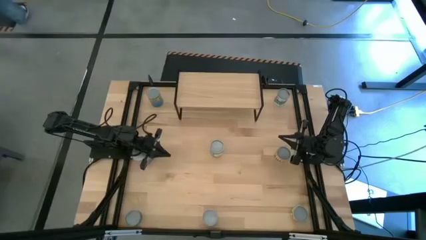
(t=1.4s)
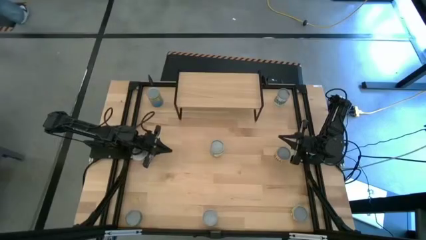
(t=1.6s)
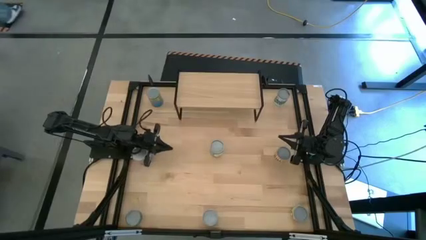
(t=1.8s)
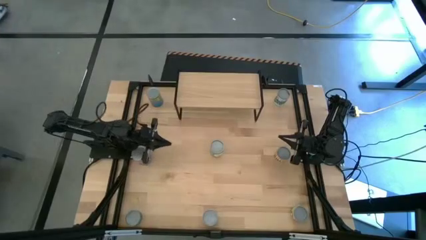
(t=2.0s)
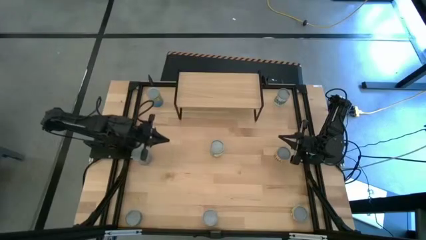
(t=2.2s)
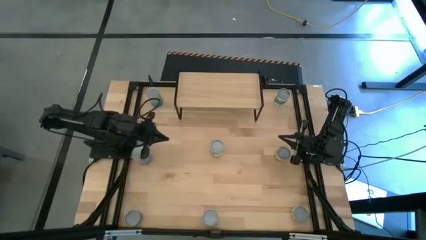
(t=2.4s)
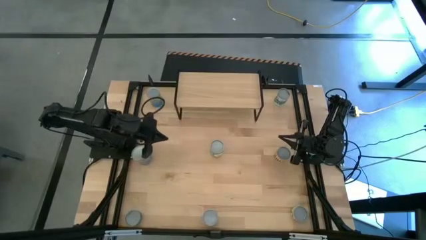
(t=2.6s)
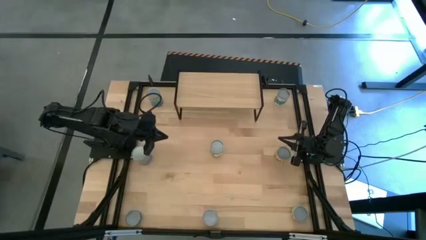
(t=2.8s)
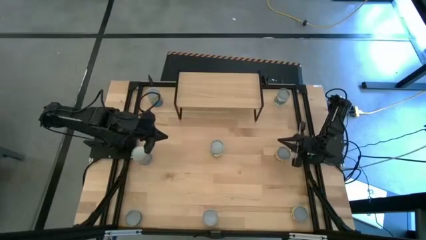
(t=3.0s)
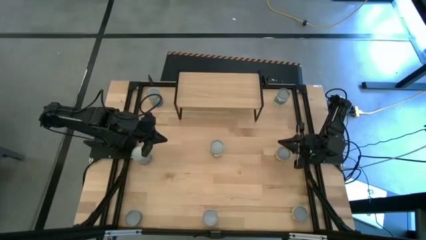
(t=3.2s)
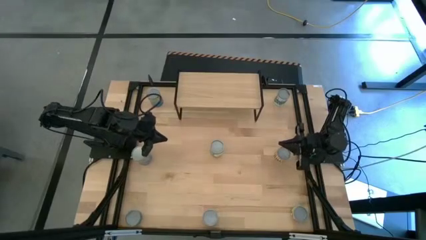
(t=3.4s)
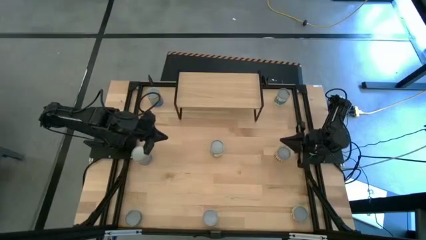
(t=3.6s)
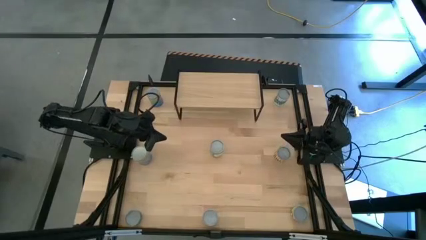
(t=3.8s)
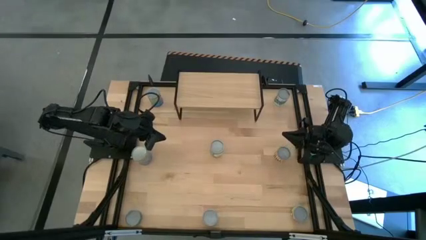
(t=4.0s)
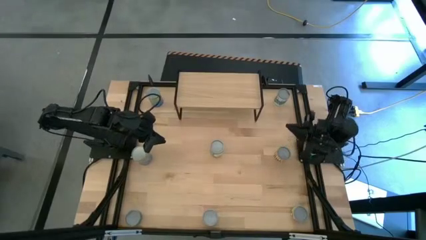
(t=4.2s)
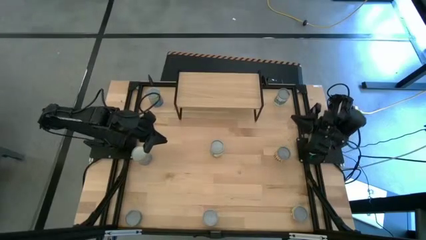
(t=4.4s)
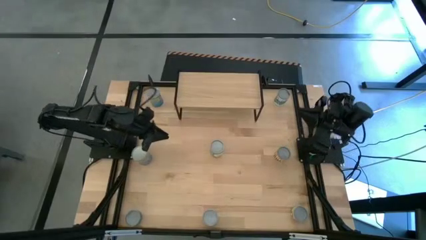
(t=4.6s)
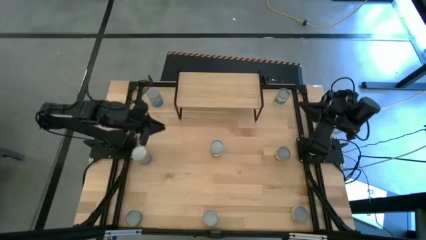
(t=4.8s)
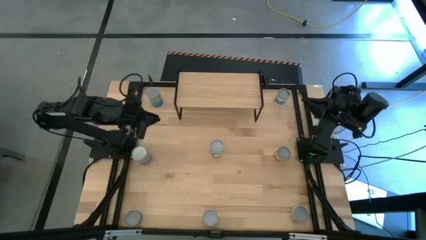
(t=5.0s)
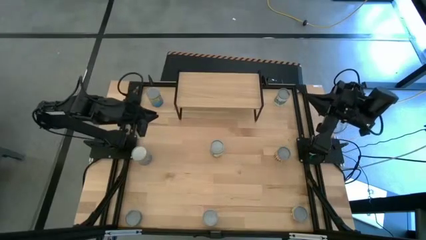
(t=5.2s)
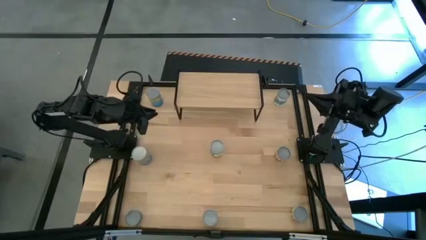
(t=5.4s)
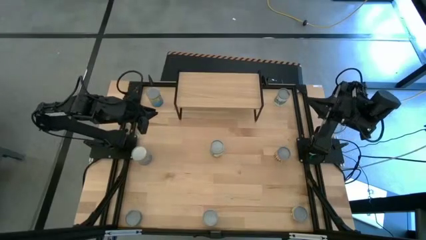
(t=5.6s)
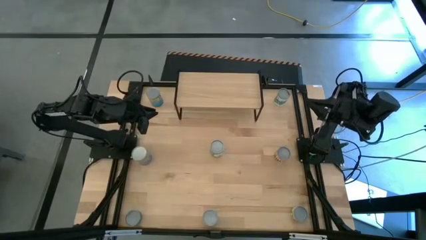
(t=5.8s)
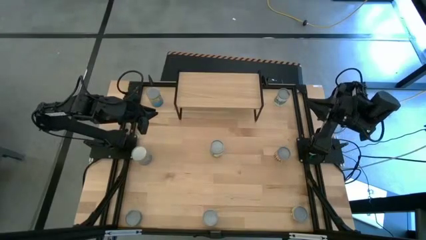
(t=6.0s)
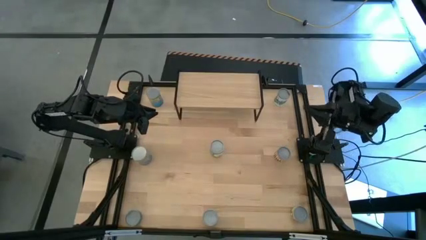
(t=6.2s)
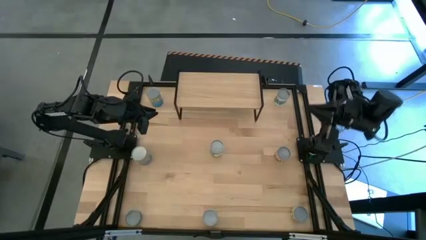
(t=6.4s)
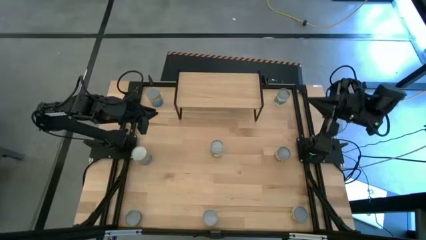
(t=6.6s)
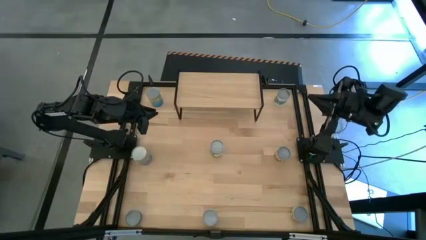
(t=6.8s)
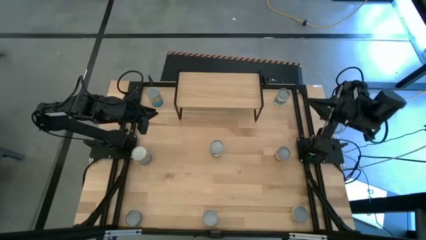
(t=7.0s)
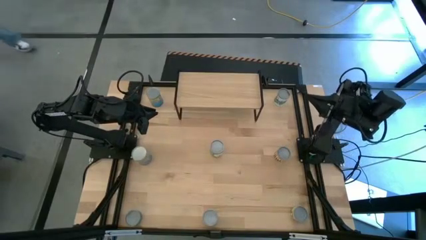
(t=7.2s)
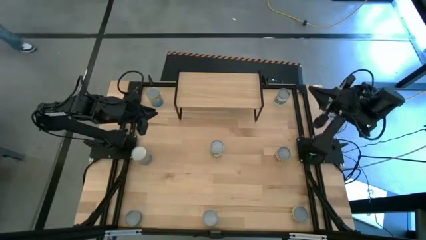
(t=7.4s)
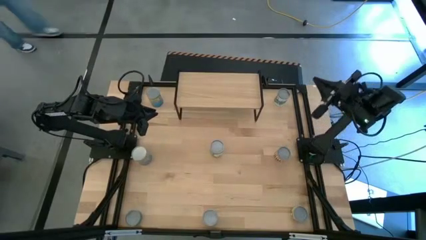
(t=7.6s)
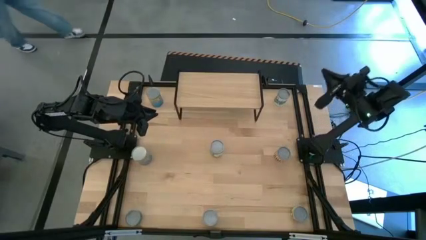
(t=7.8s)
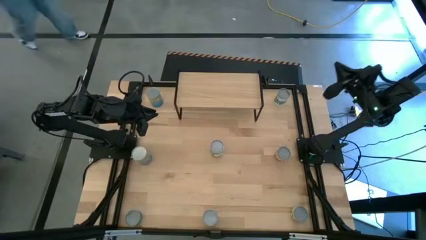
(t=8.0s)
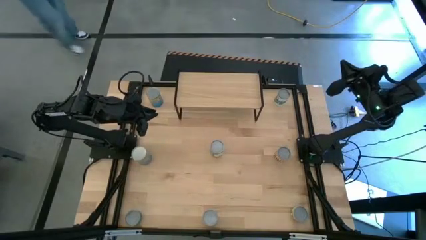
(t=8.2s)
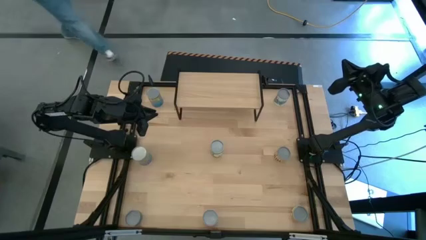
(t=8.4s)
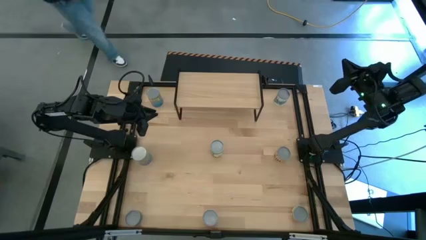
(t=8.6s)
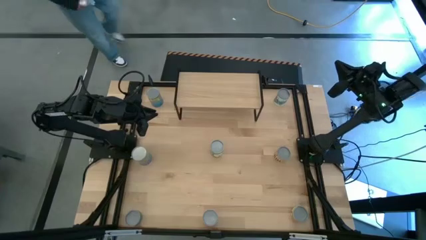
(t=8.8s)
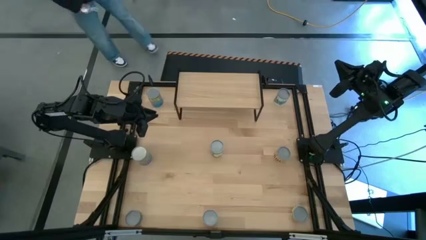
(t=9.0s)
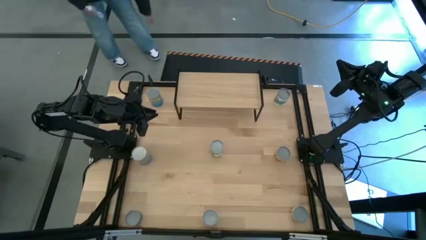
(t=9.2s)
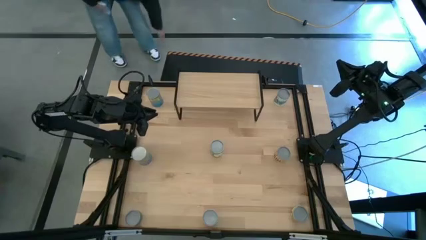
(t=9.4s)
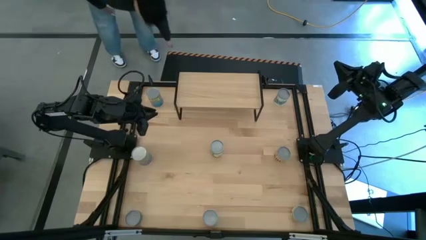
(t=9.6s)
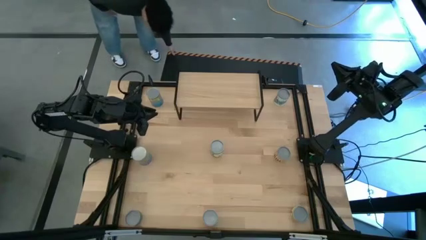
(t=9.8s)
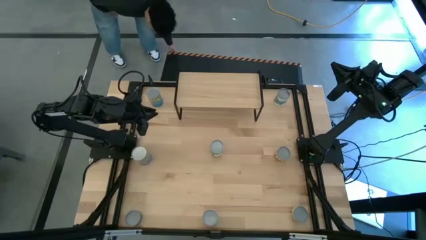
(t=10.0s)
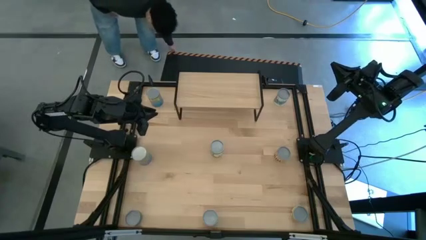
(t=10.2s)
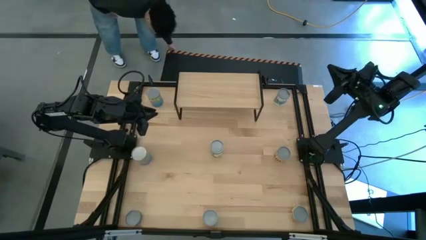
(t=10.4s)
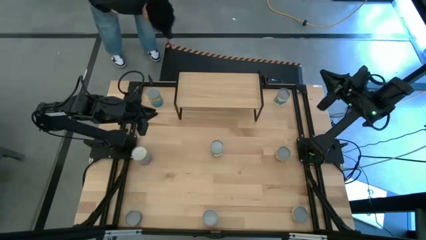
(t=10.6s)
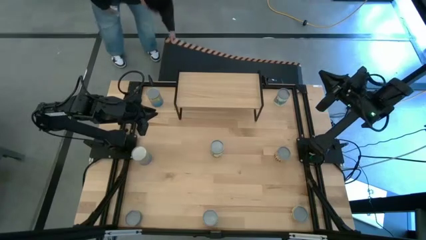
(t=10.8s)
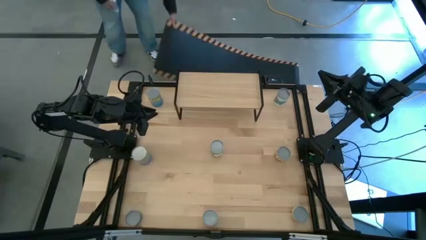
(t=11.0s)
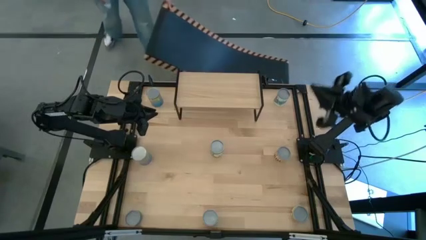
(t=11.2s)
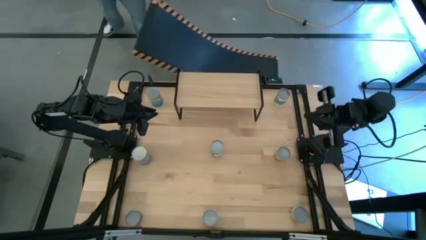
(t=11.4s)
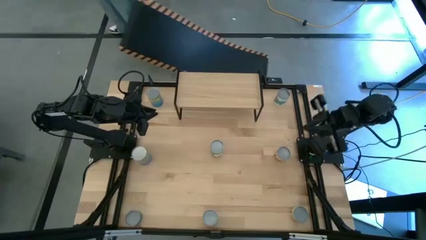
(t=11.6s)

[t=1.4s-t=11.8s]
Task: Pick and place cans onto a shelf
Put the canned chicken soup on the shelf

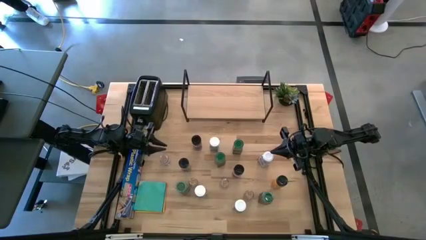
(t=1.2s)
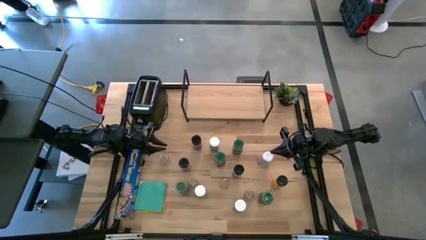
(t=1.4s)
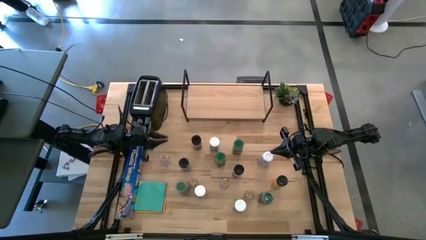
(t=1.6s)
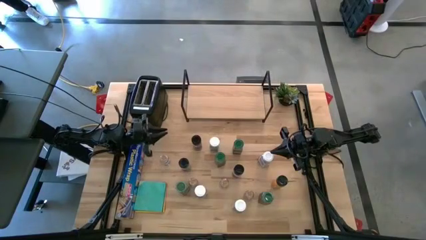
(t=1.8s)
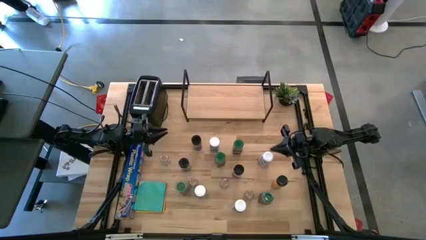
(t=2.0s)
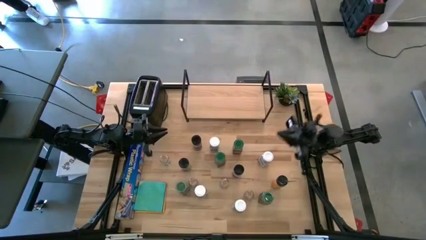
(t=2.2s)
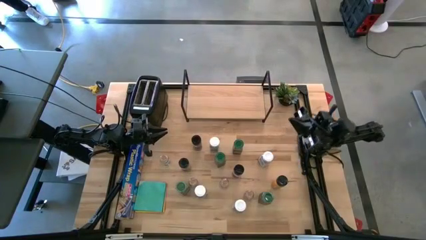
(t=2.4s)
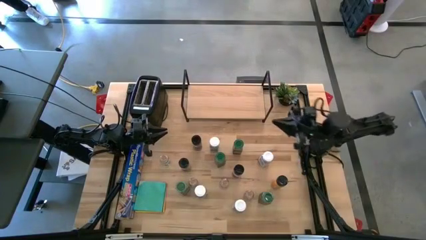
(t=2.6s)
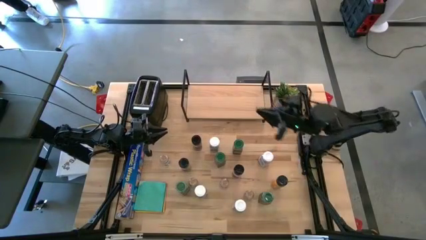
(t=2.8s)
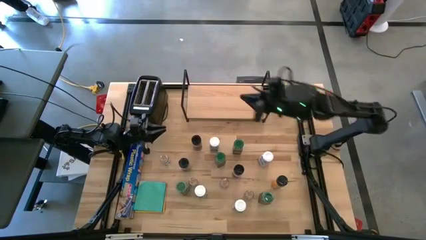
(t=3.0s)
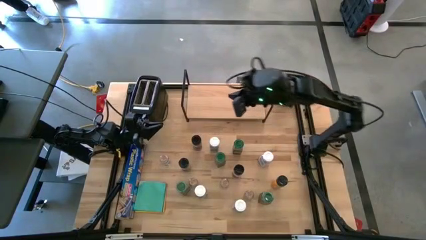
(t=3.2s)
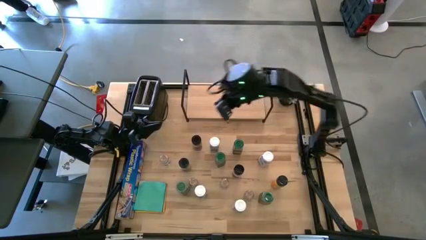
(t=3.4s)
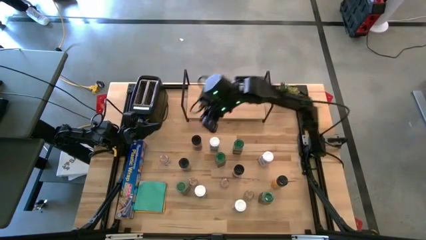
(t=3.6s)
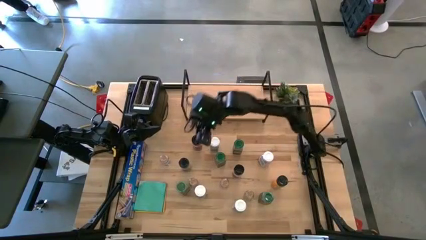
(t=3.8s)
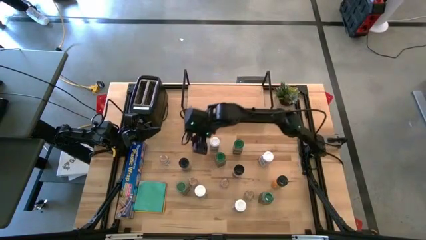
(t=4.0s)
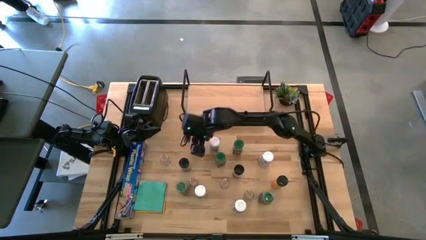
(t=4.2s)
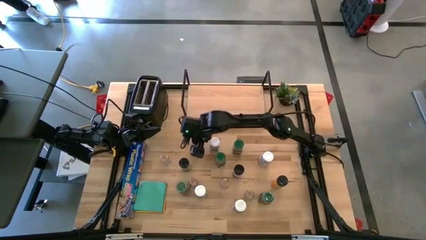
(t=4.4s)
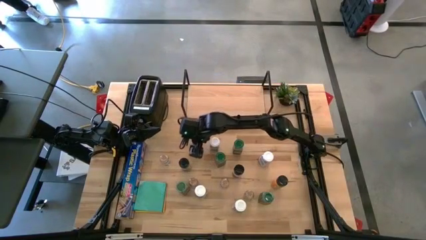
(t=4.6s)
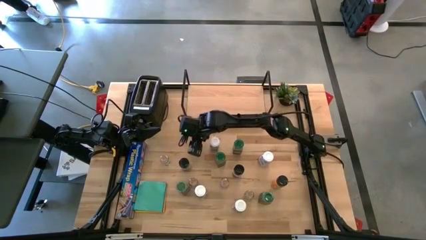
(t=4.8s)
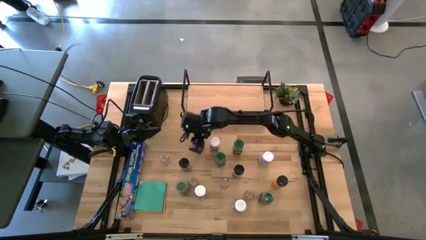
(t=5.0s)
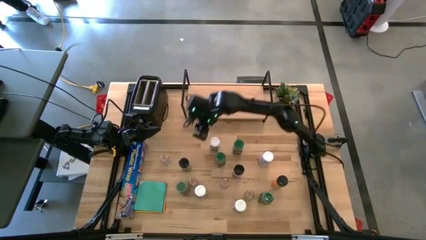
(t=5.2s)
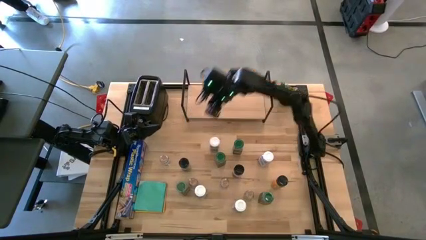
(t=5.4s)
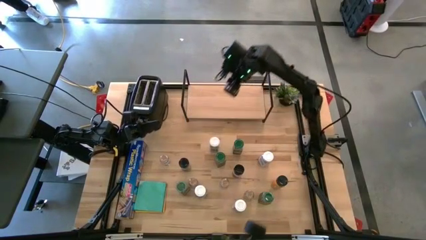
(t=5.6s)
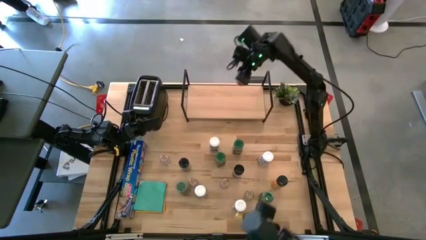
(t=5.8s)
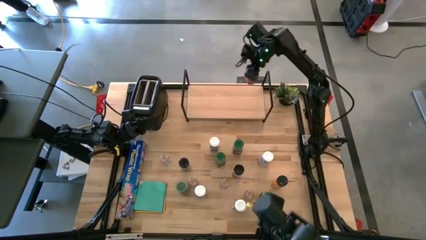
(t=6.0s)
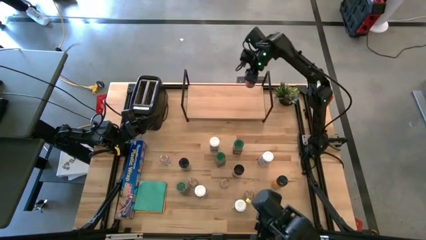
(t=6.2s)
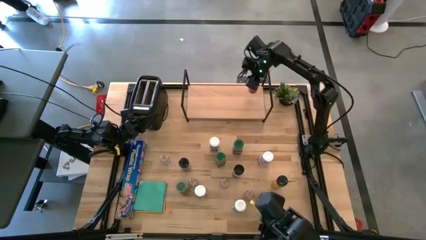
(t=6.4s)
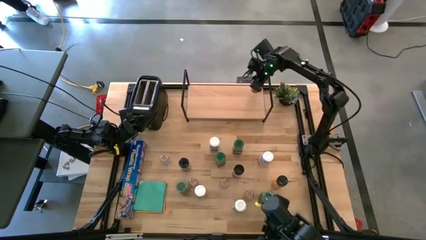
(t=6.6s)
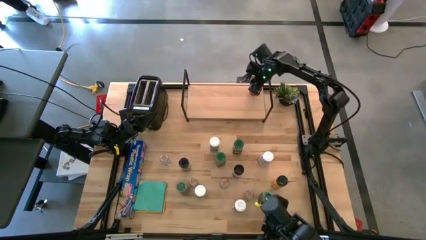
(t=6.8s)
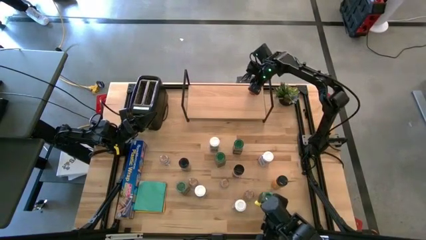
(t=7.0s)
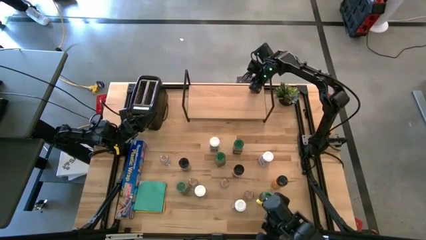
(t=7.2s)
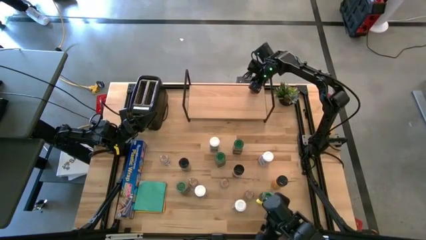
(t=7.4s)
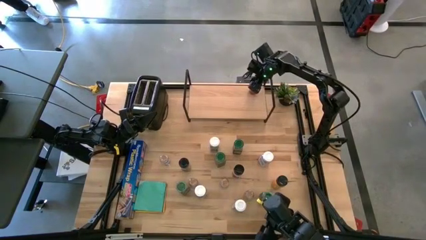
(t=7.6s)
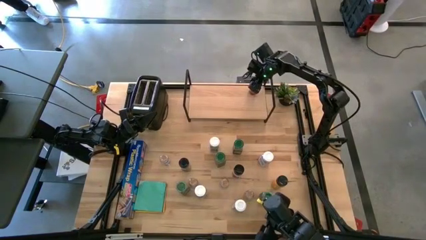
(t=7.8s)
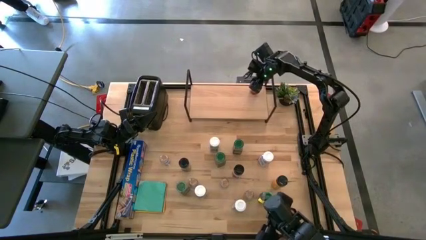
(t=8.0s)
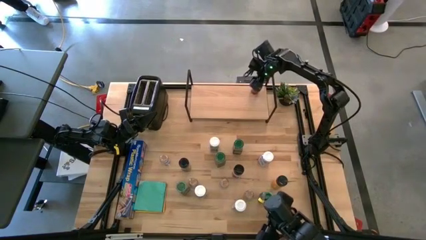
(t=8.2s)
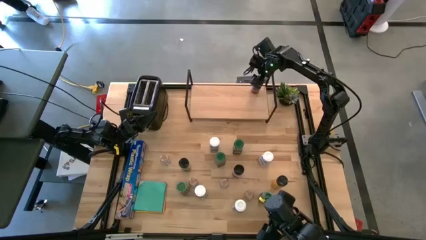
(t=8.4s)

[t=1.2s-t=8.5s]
Task: Shelf spices
Put the top left black spice bottle on the shelf
